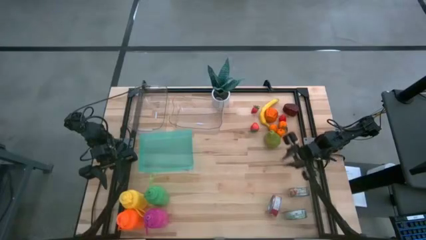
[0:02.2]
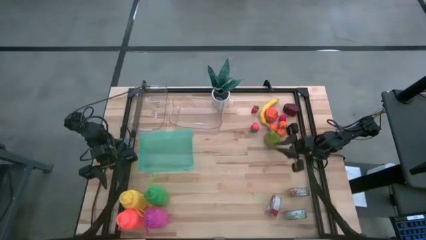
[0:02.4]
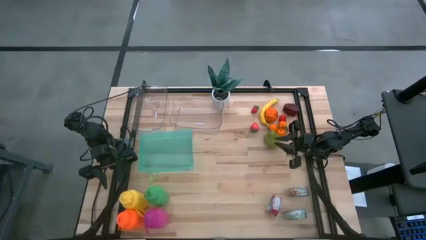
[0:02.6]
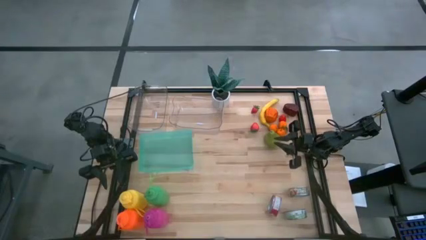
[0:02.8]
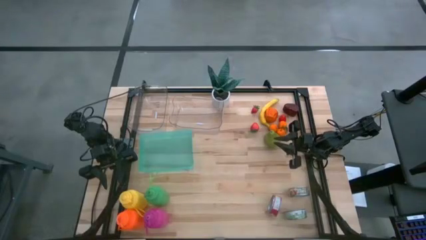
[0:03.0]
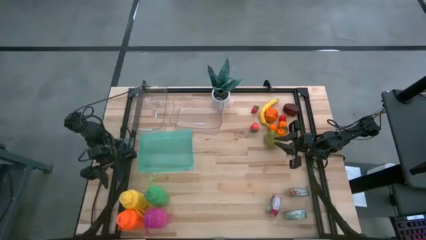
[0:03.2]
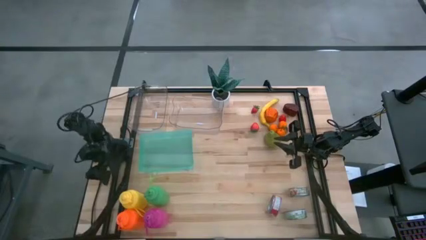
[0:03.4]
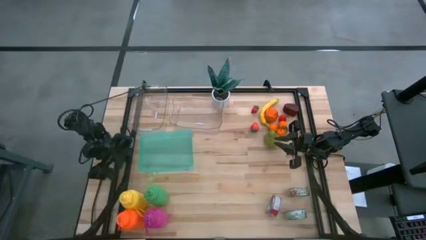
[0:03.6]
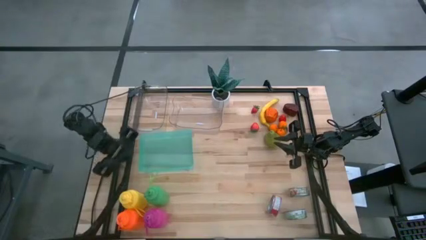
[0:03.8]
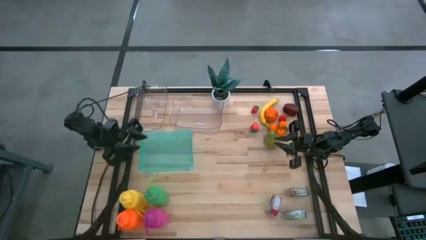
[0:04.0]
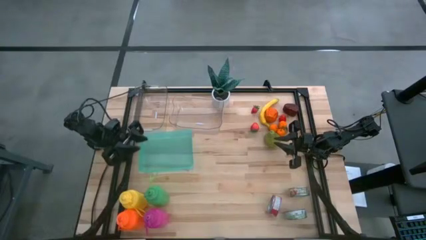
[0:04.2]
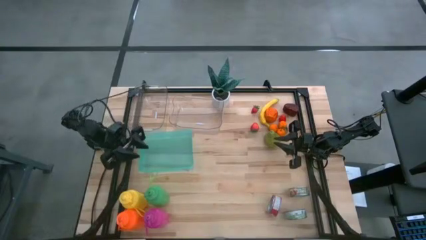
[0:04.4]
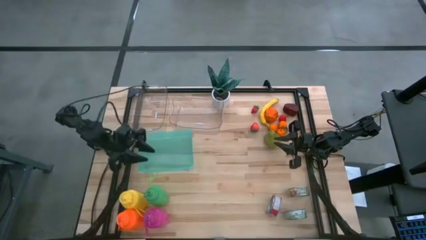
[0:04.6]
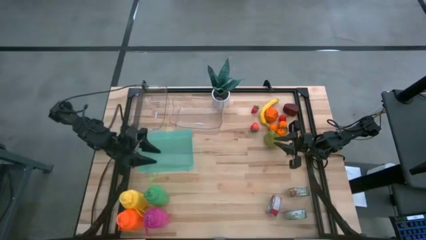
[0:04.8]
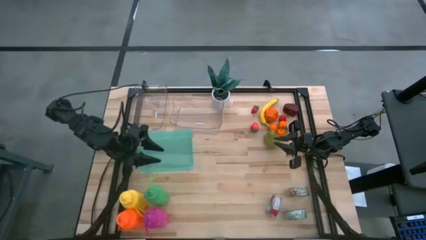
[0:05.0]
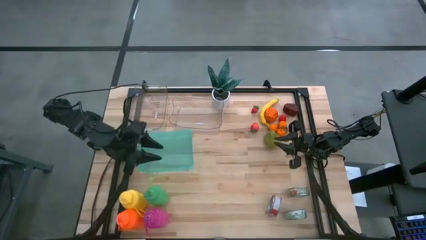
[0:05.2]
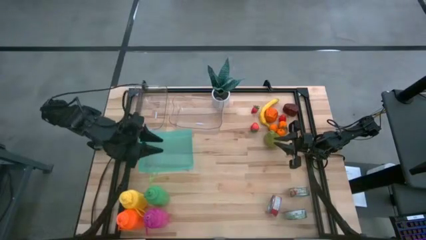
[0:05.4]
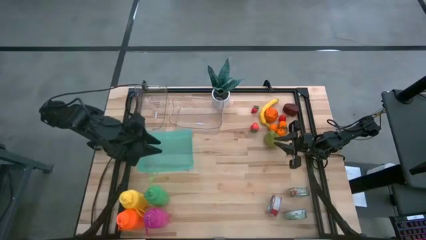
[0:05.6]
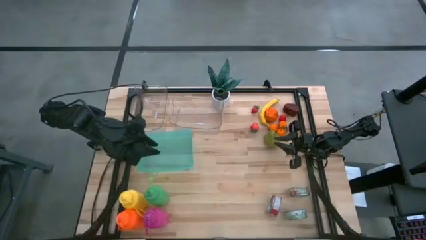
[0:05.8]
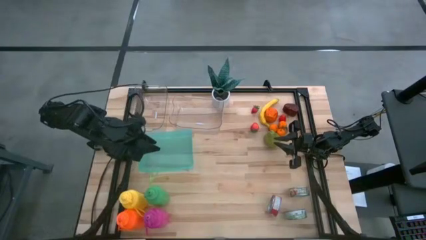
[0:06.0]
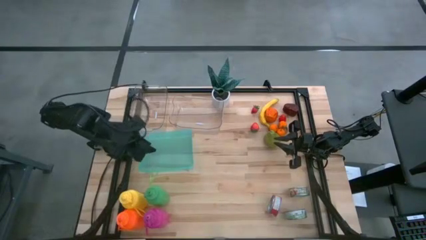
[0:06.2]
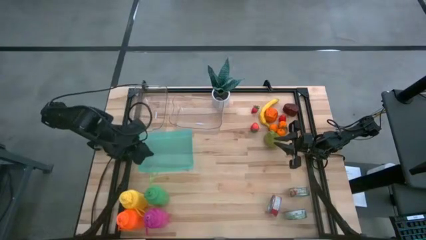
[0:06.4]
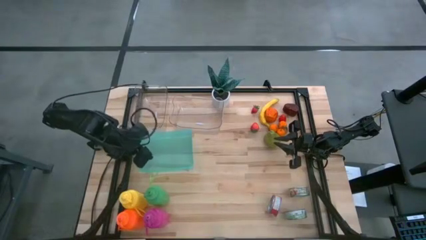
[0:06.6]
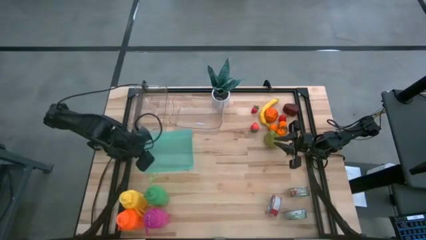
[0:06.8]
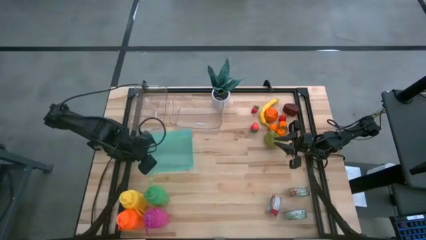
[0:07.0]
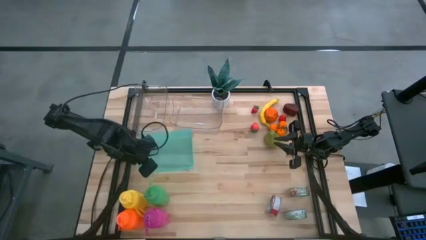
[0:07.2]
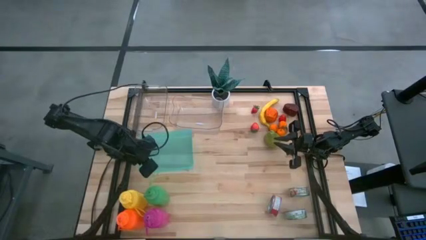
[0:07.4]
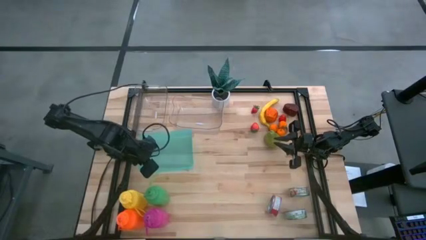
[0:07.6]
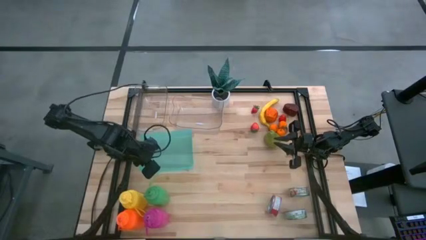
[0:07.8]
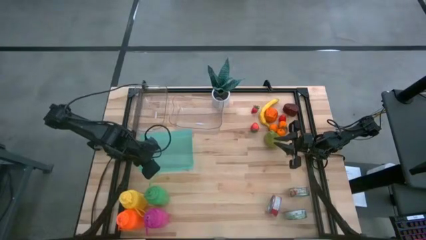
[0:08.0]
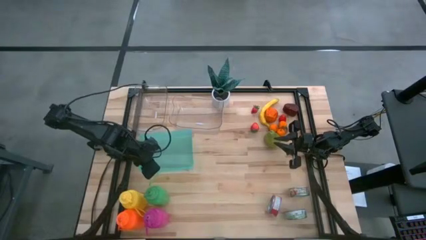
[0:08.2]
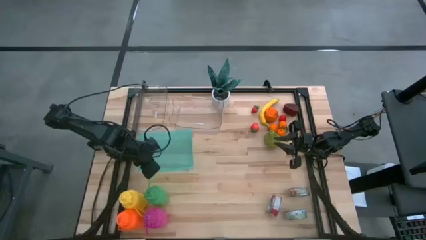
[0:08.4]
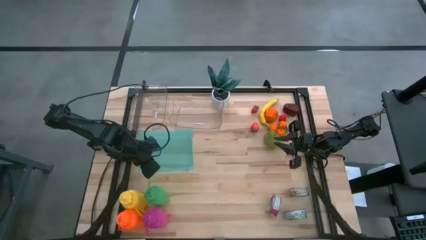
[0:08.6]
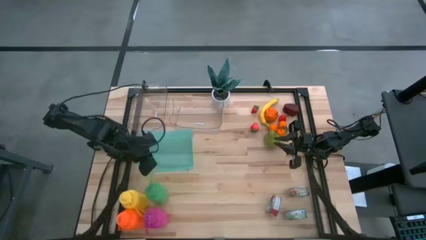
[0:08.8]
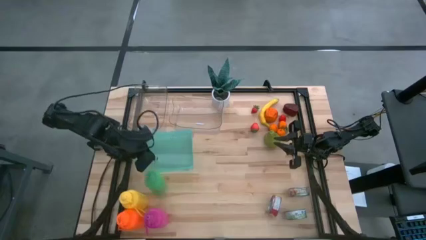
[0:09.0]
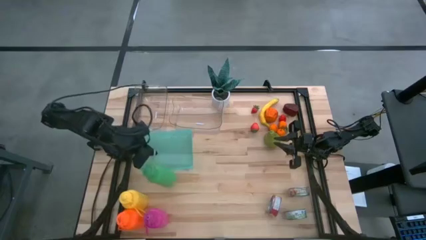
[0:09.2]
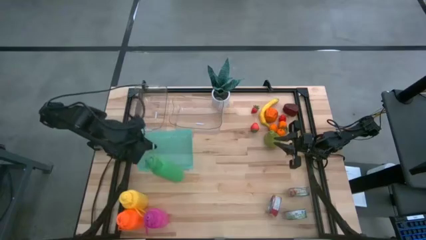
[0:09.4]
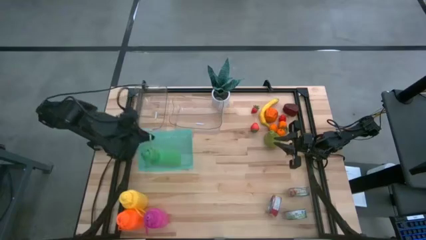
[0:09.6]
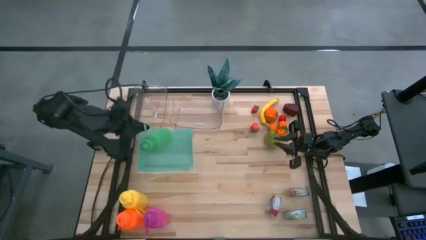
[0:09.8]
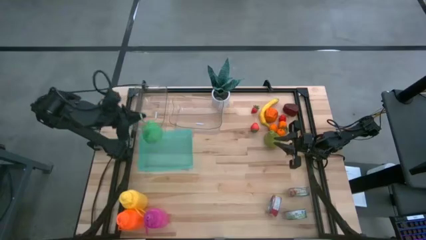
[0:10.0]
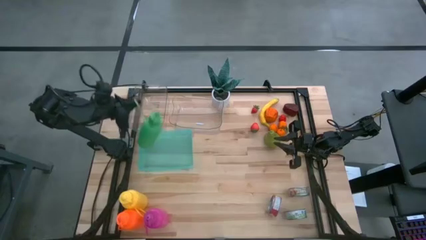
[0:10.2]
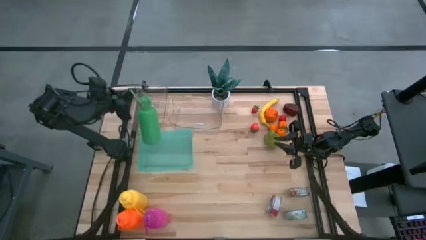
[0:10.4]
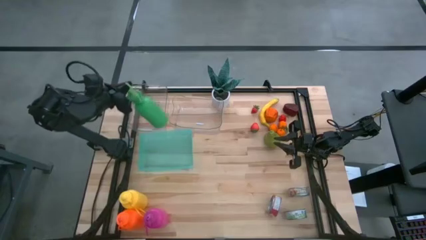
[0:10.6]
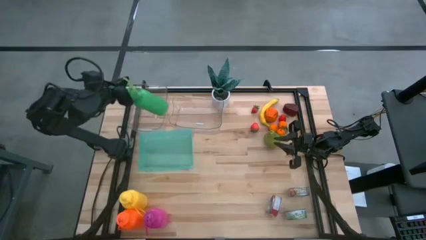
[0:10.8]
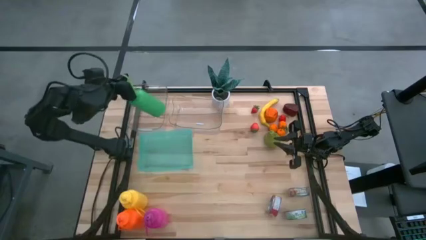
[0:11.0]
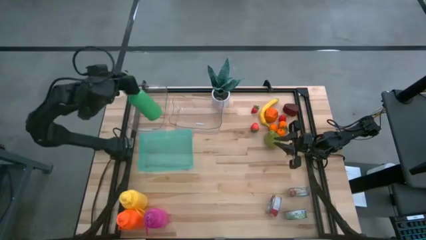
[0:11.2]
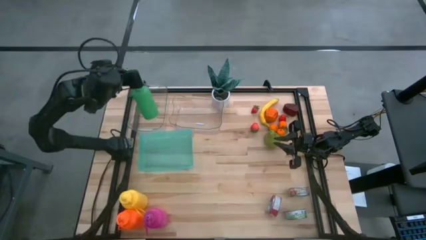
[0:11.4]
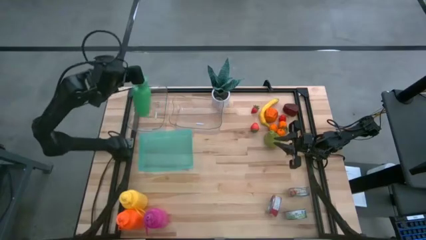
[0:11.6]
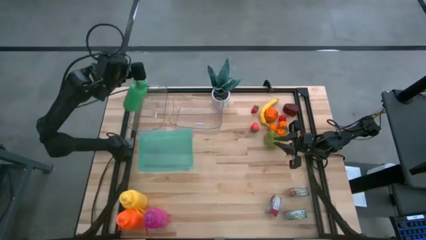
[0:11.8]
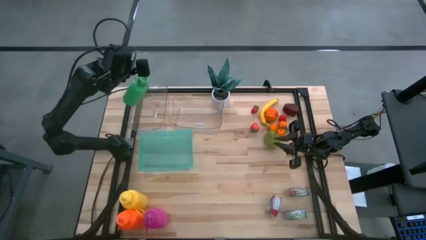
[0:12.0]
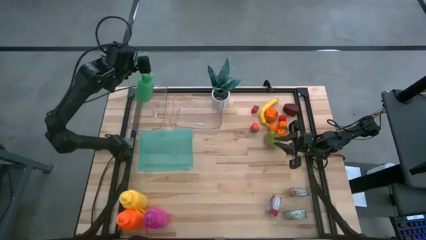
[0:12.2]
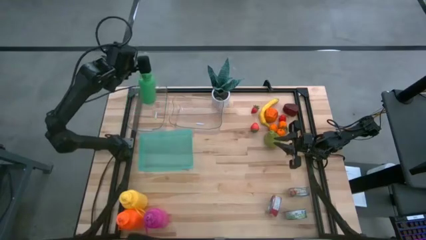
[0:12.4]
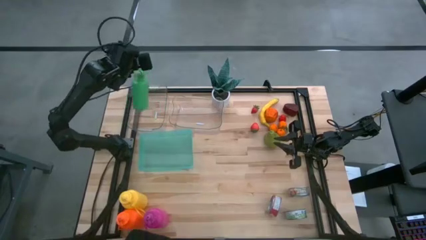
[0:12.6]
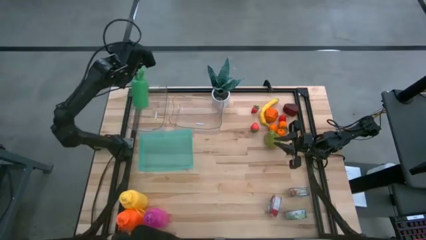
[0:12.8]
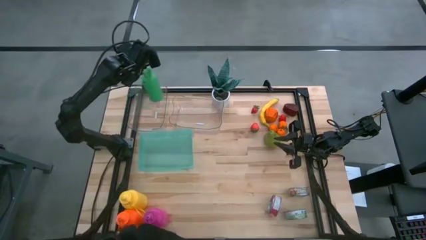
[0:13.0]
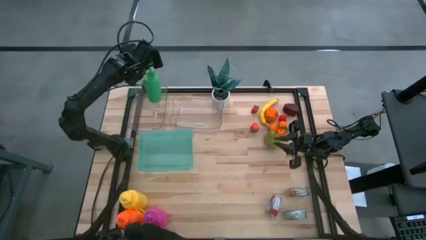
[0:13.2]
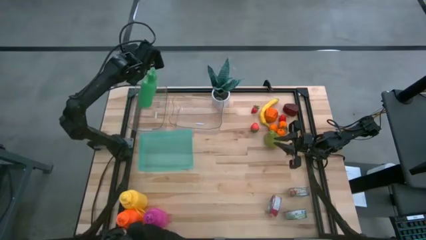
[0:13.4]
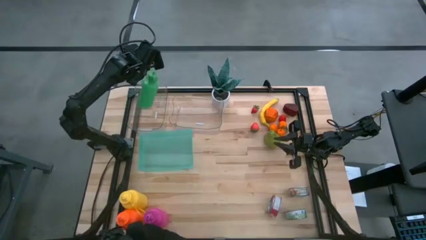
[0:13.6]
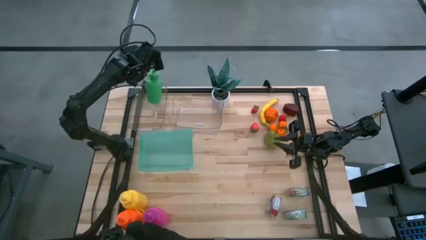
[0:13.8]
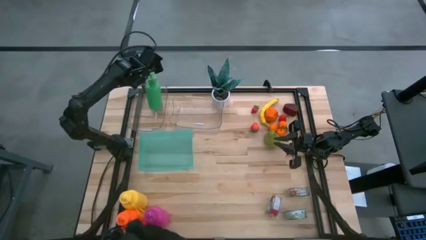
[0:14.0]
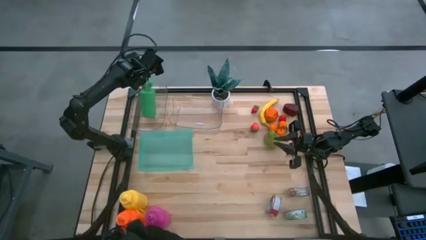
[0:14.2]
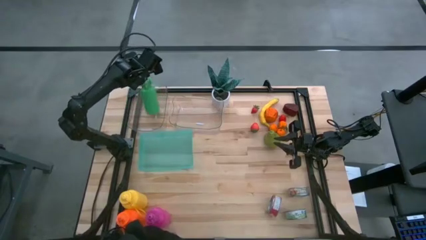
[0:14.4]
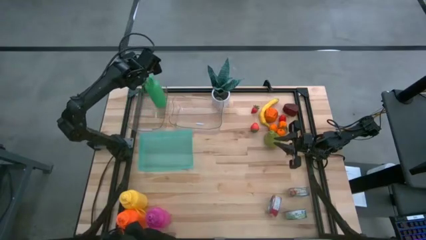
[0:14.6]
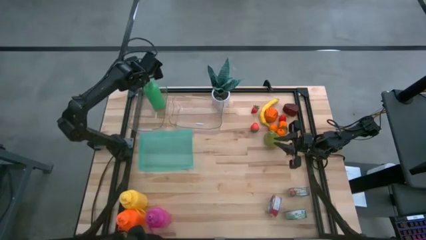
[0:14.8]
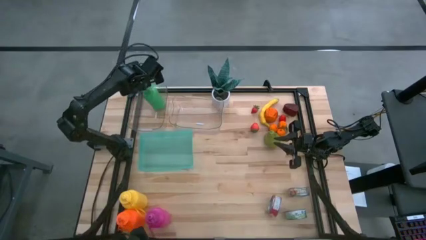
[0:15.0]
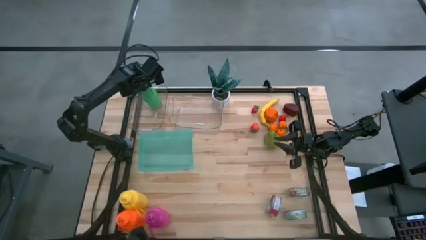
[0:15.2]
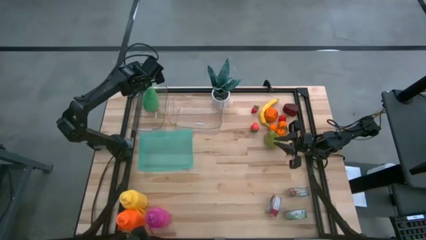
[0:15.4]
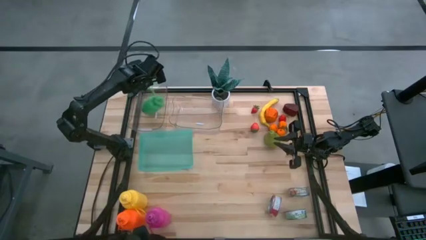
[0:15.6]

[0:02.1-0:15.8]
Task: Pick & Place Food Item
Put the green water bottle into the left transparent bin
